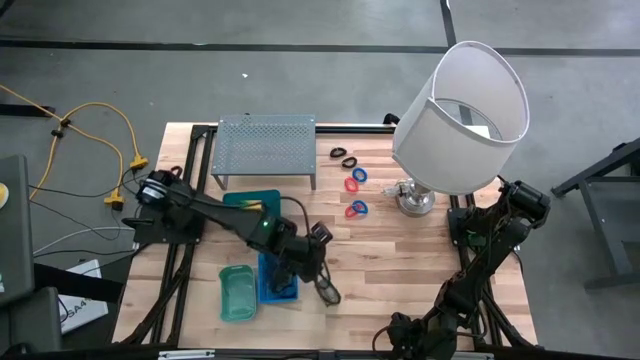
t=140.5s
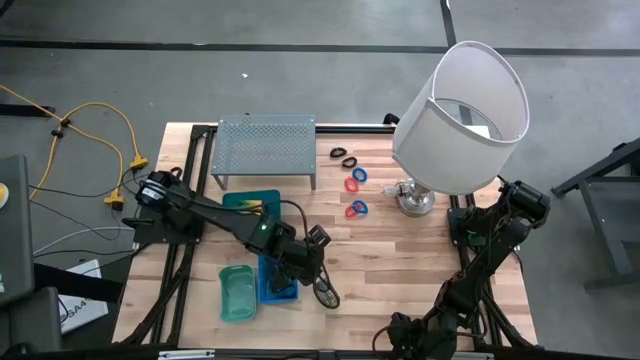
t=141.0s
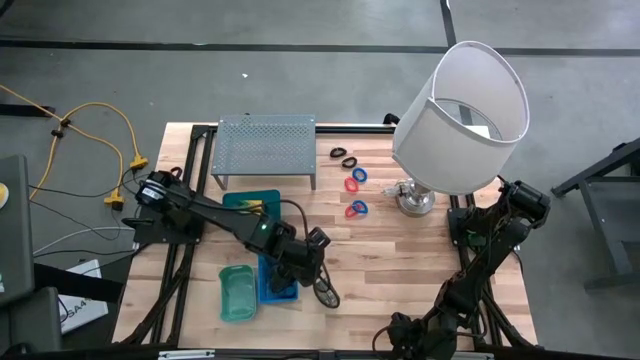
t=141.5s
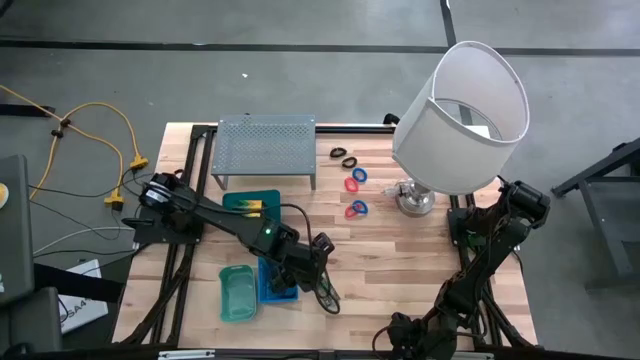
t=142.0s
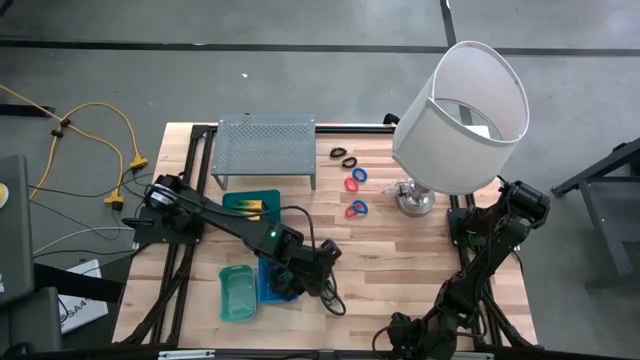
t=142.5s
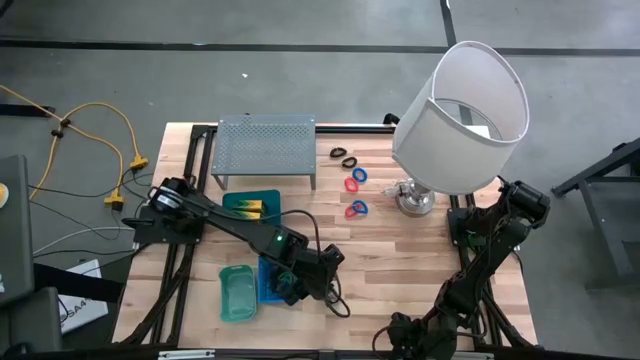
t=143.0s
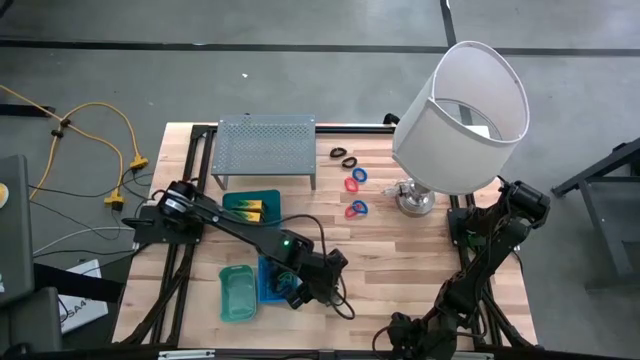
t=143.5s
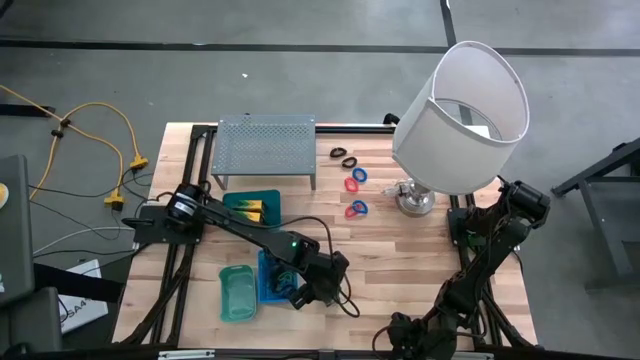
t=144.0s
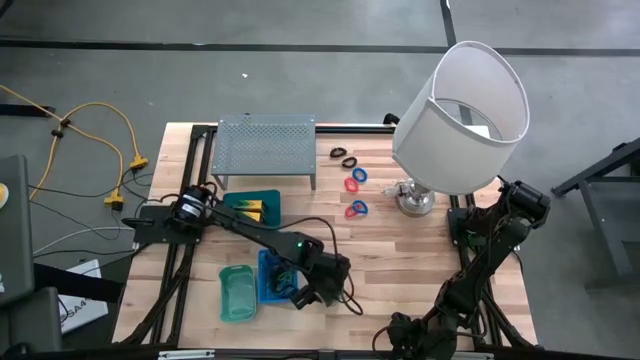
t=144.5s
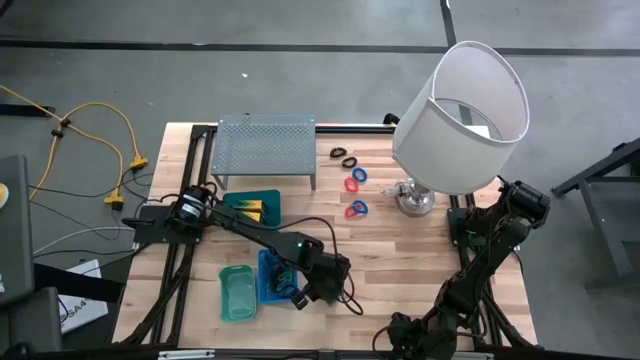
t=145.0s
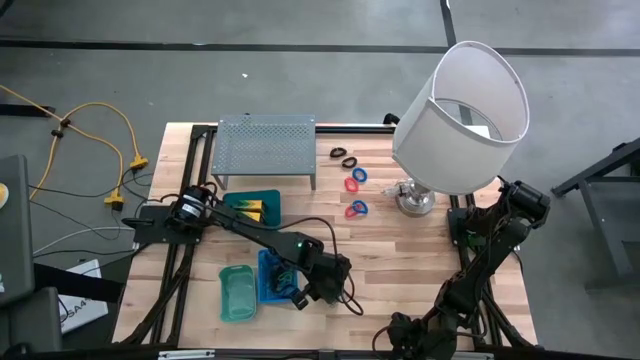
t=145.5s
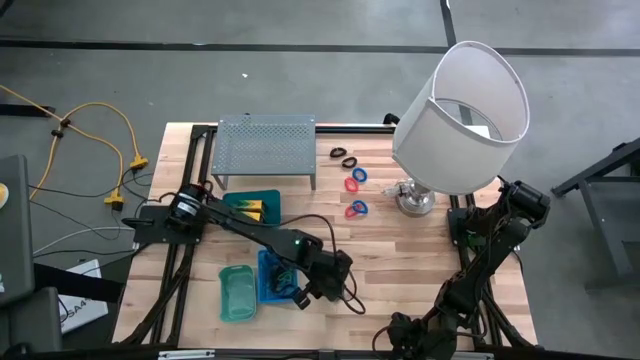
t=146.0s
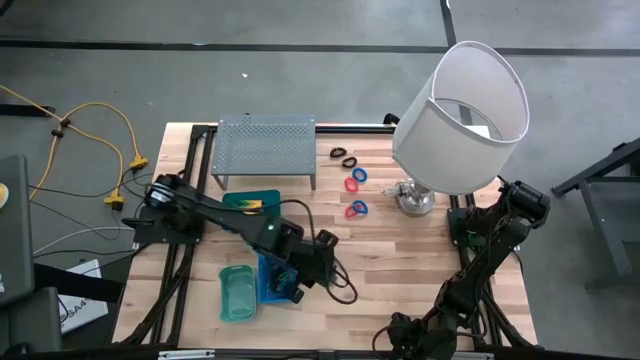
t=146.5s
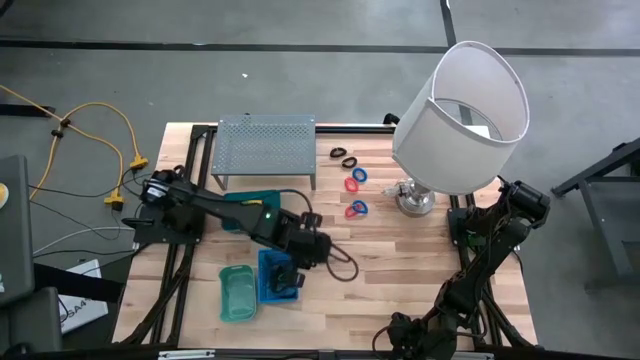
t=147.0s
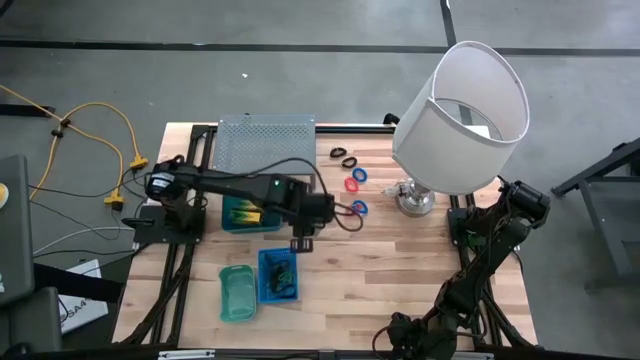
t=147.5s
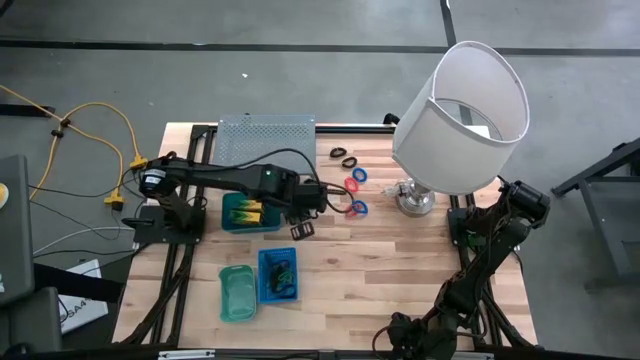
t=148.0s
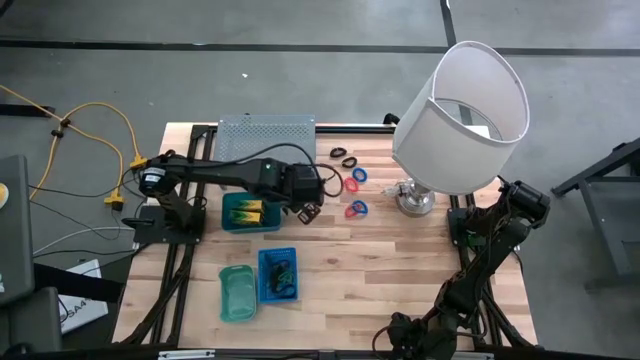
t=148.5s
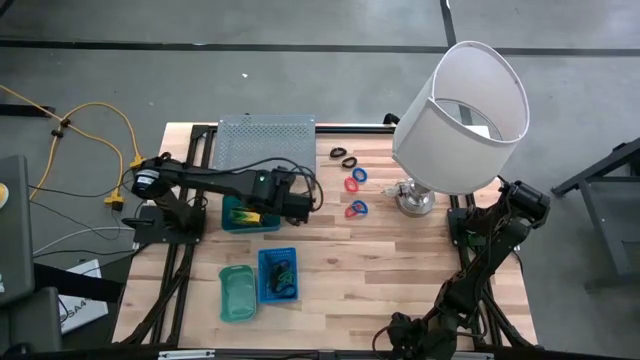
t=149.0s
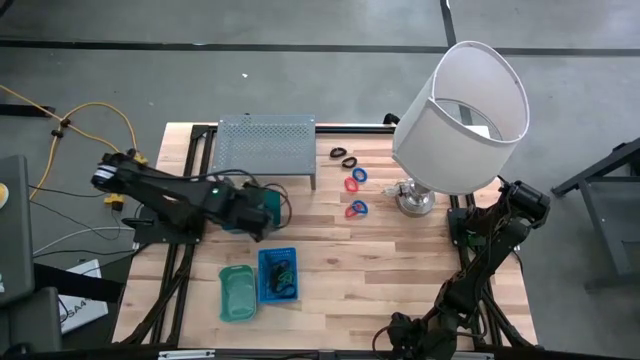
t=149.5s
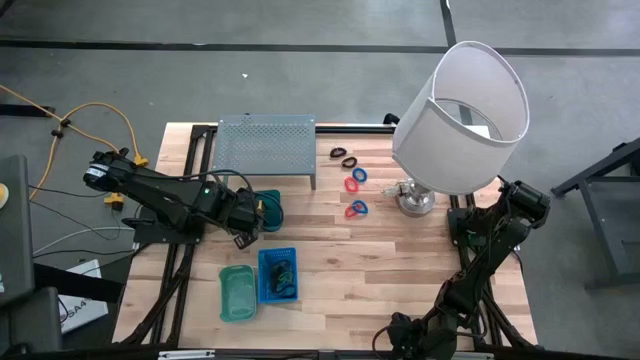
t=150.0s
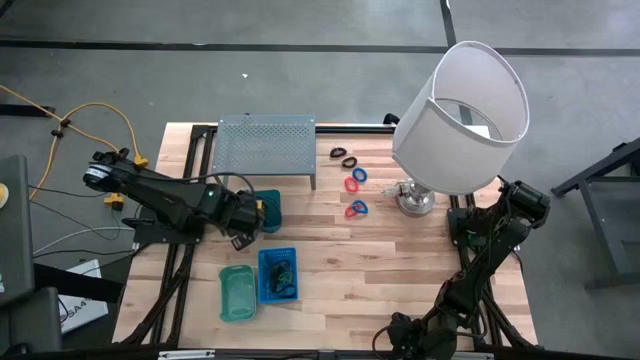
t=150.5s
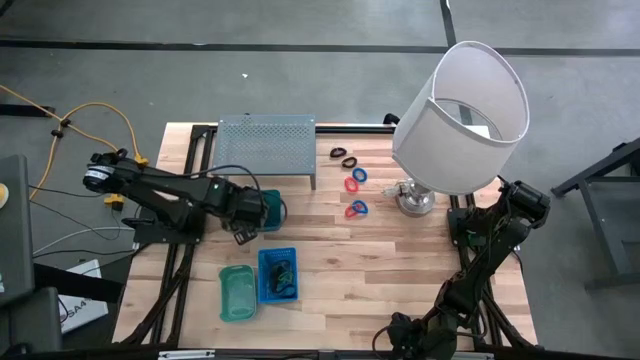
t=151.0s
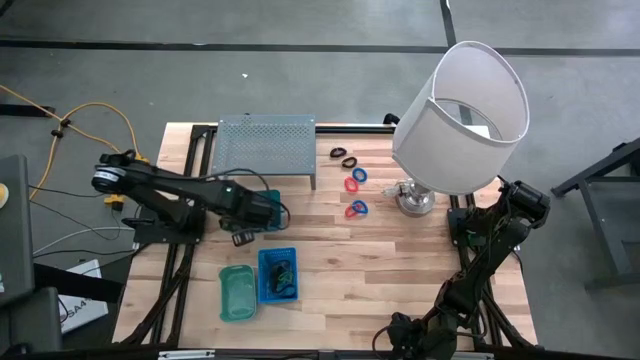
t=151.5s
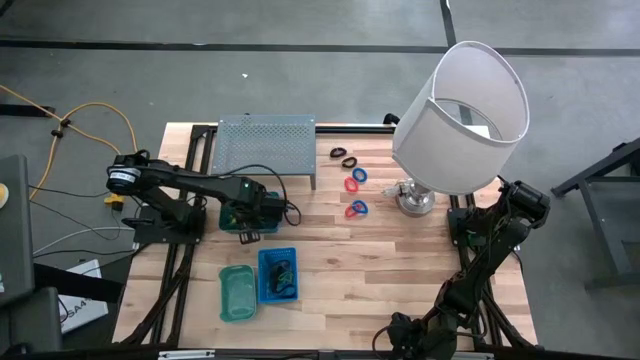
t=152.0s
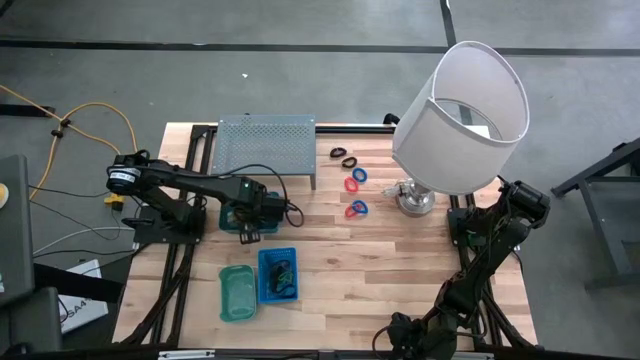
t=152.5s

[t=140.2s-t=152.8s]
Task: Pick & Place Office Desk Supplies
Put the crayon box into the top blue bin

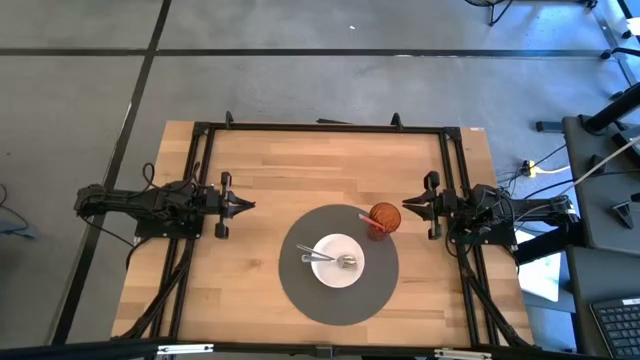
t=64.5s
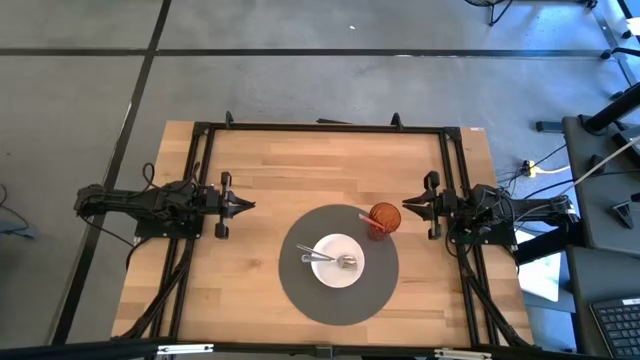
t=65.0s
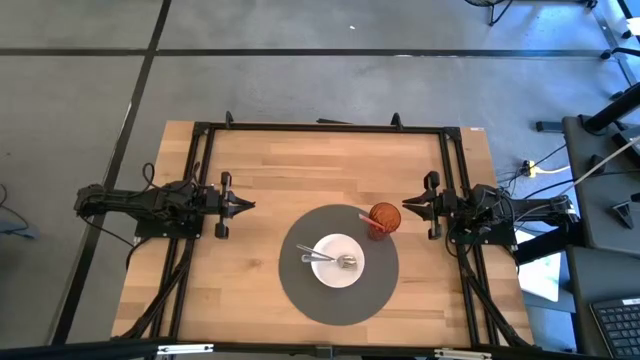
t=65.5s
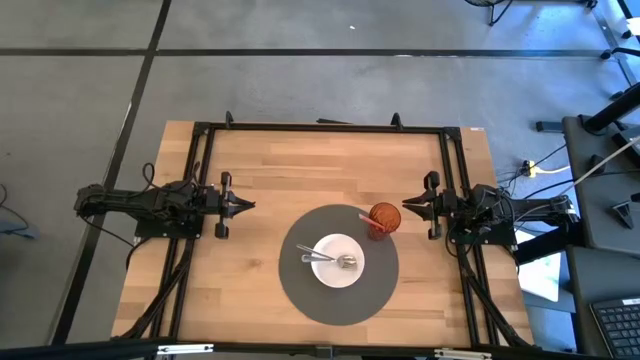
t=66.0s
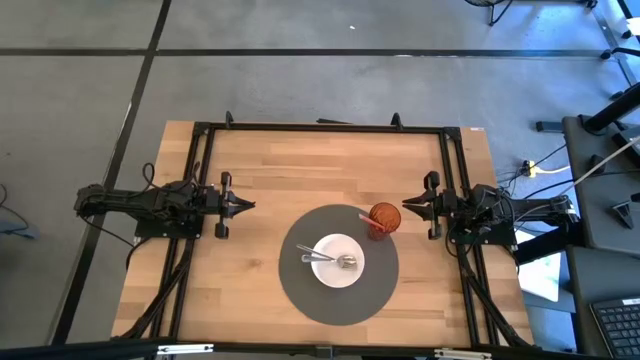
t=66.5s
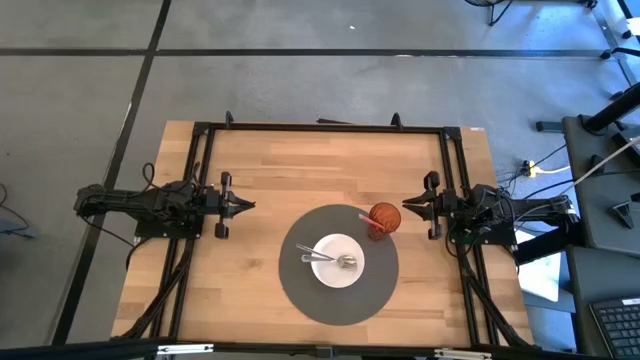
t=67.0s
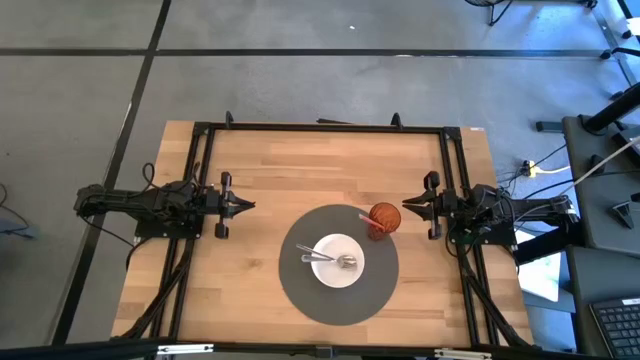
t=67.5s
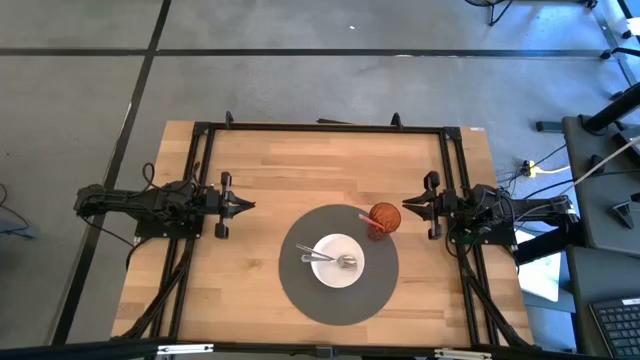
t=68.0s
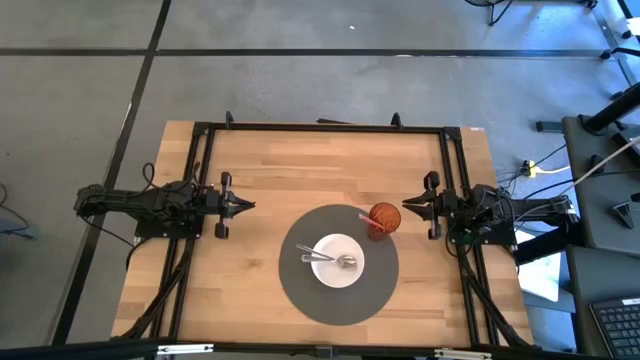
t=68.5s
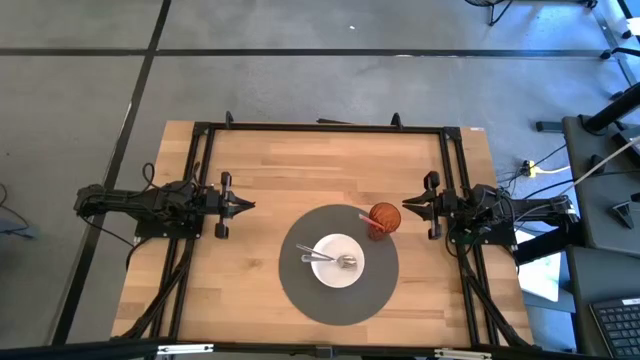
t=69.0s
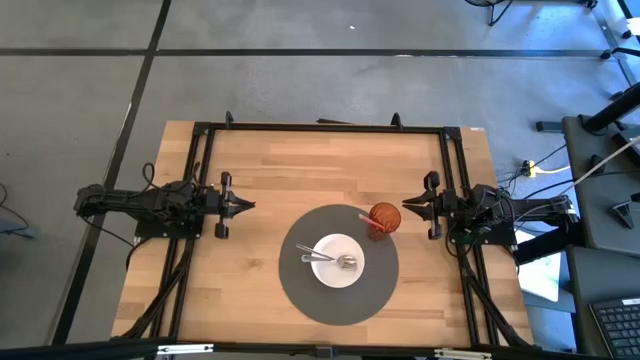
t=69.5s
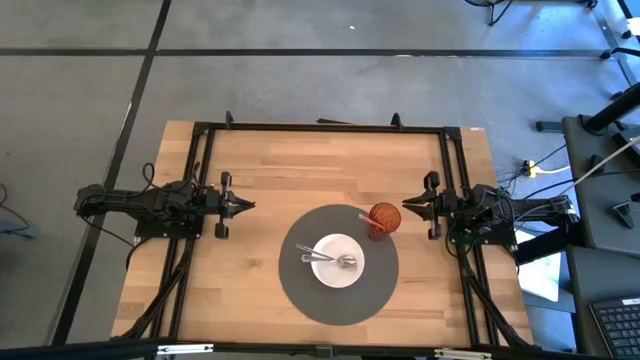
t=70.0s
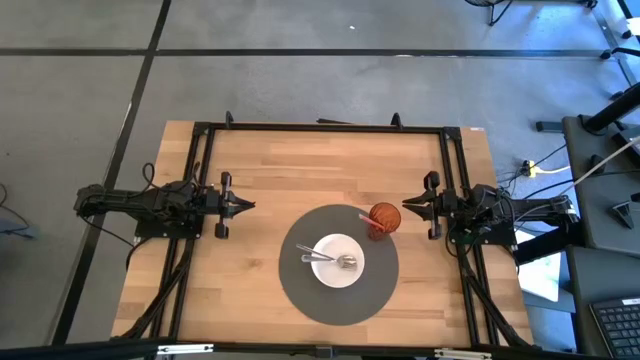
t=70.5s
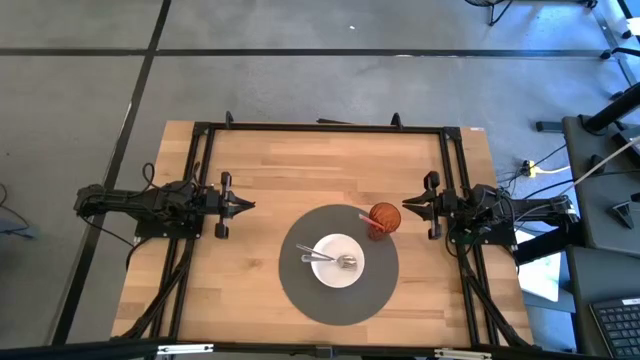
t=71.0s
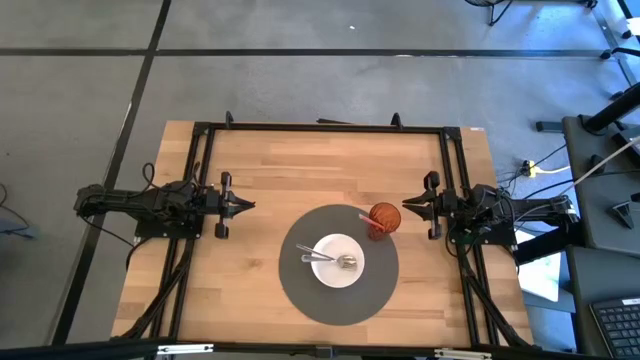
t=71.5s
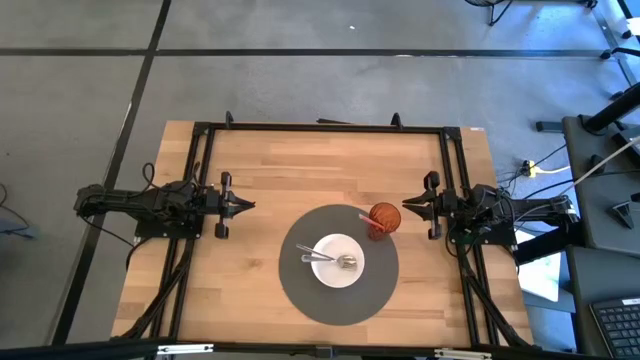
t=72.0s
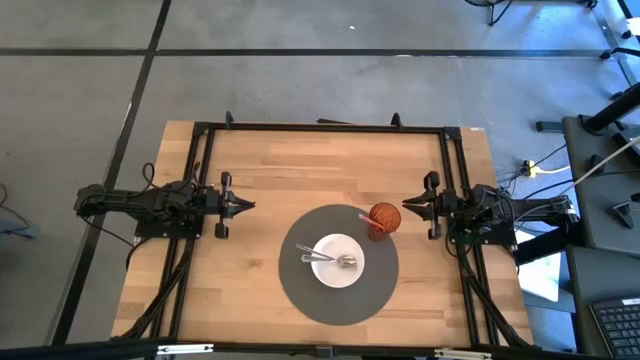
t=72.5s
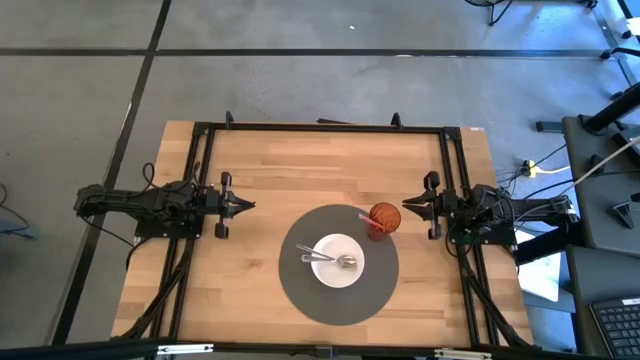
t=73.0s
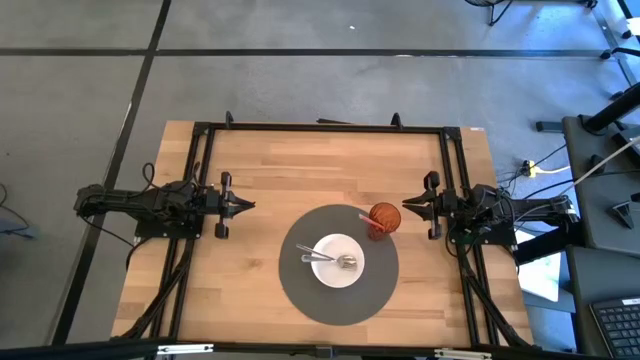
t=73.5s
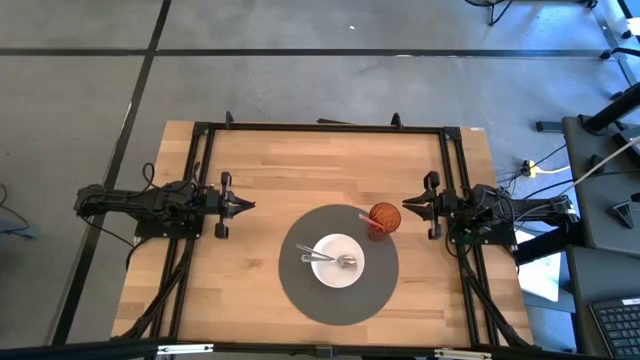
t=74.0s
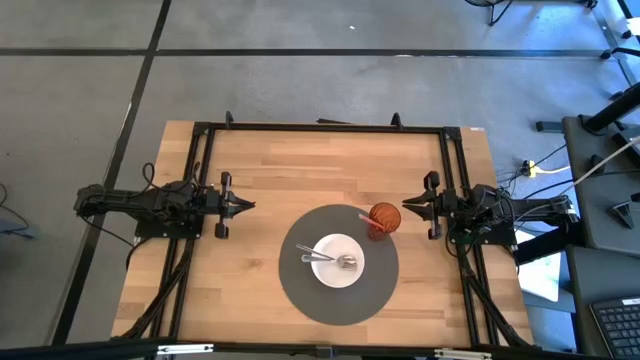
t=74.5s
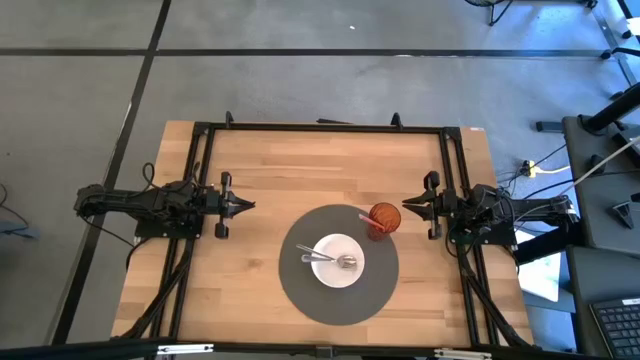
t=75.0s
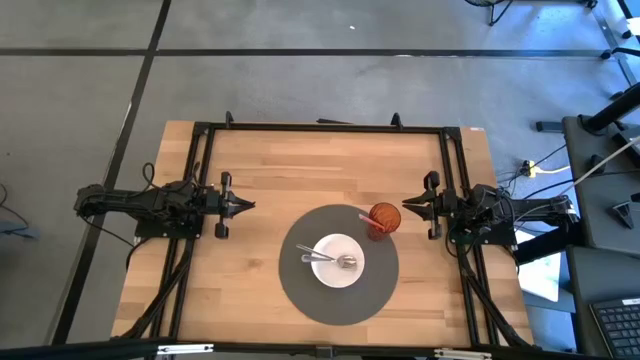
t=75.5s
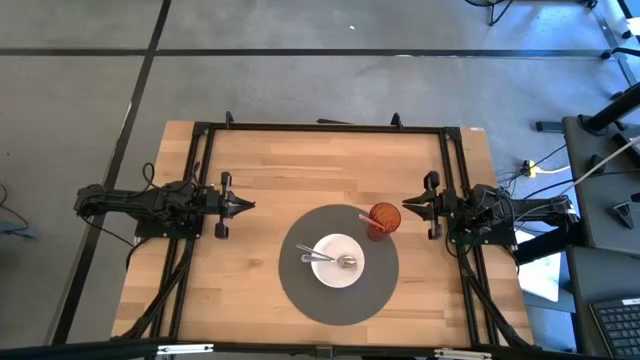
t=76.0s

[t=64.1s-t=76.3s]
Task: Pick & Place Utensil
Return to Home Position
